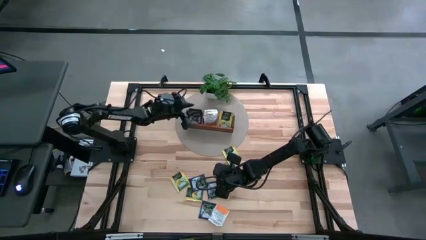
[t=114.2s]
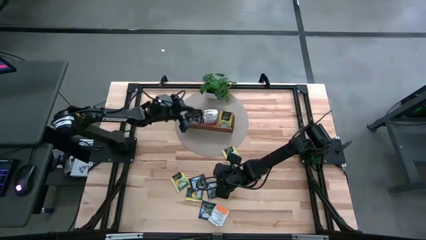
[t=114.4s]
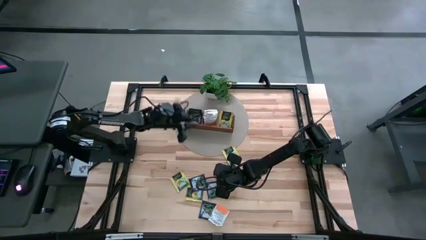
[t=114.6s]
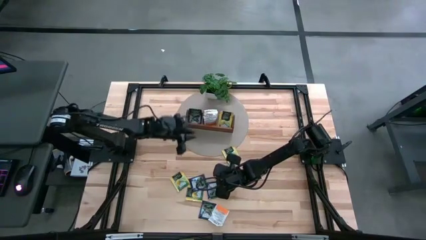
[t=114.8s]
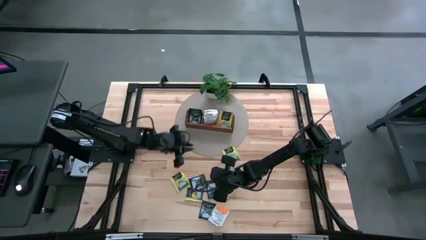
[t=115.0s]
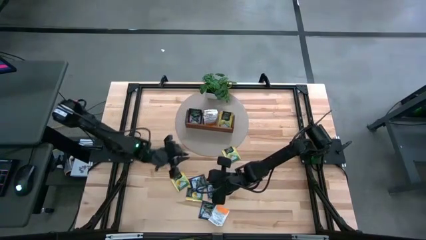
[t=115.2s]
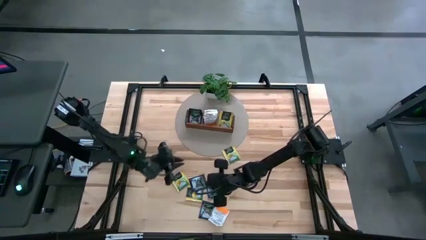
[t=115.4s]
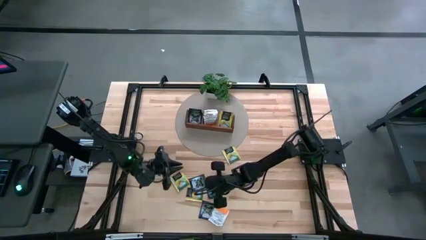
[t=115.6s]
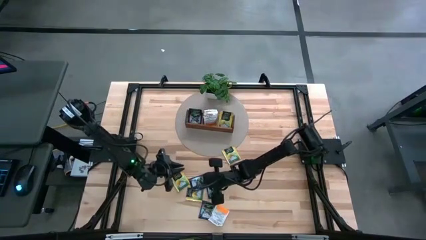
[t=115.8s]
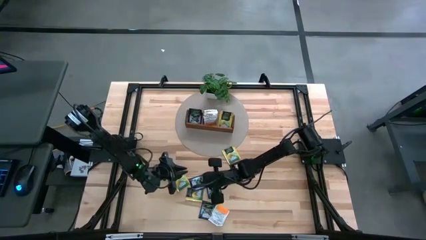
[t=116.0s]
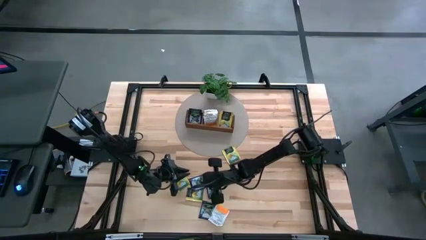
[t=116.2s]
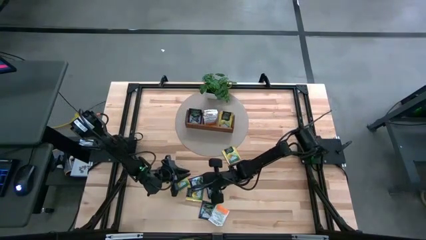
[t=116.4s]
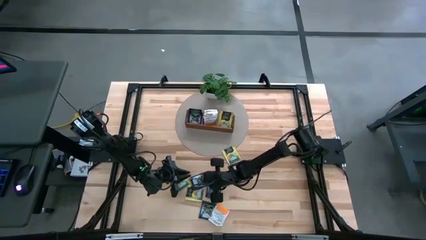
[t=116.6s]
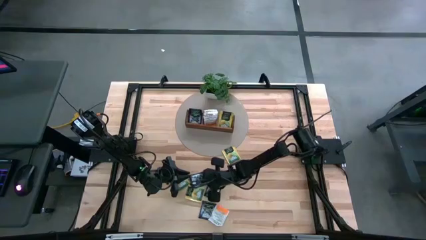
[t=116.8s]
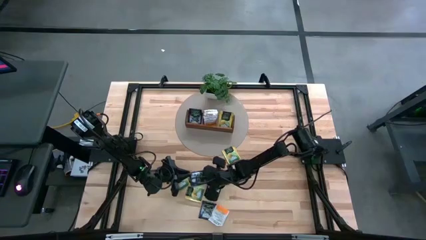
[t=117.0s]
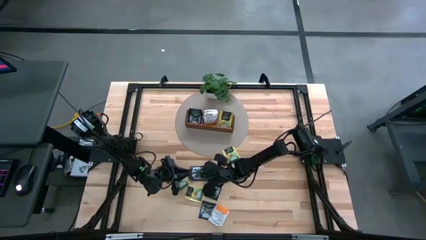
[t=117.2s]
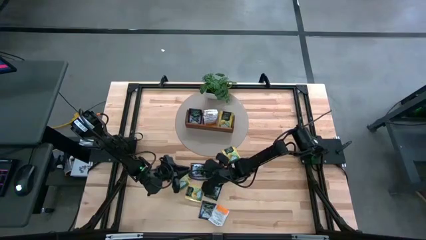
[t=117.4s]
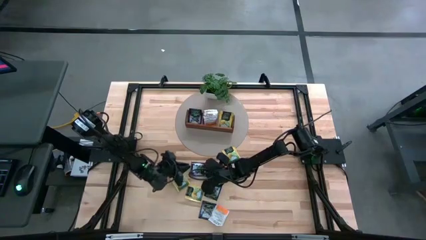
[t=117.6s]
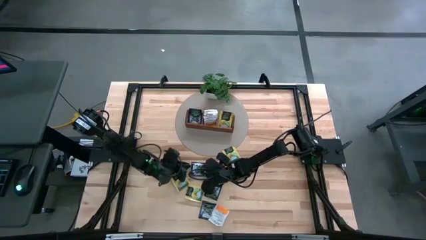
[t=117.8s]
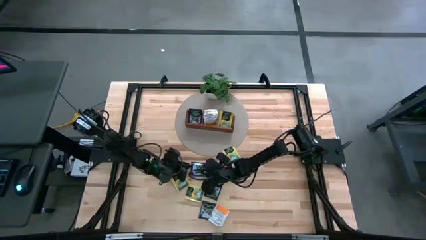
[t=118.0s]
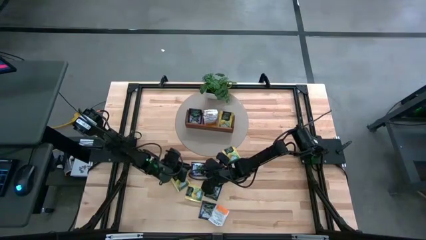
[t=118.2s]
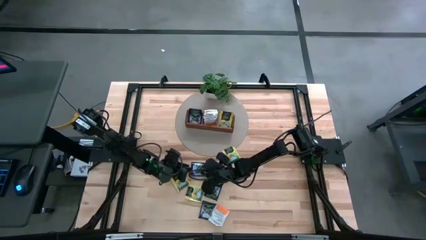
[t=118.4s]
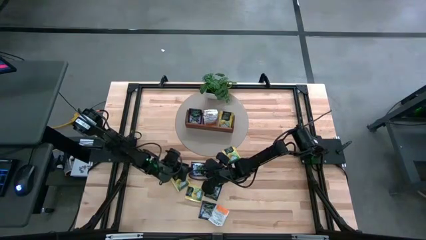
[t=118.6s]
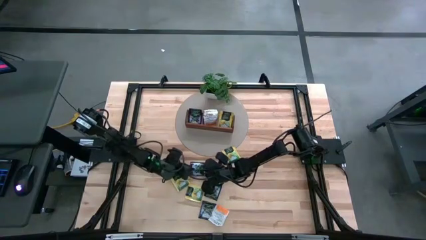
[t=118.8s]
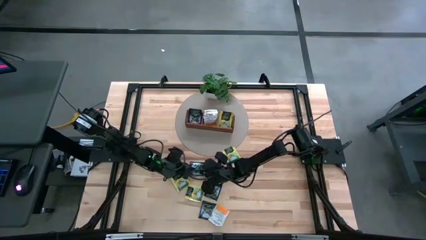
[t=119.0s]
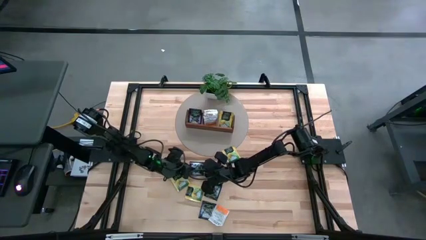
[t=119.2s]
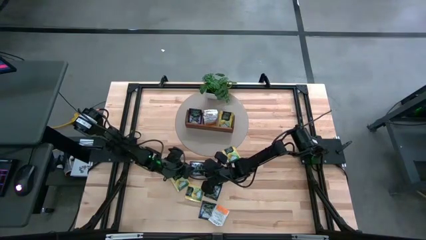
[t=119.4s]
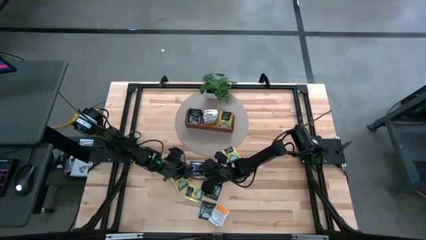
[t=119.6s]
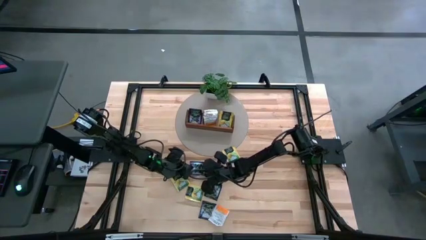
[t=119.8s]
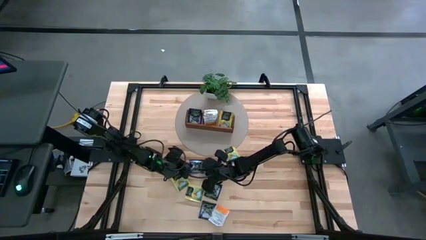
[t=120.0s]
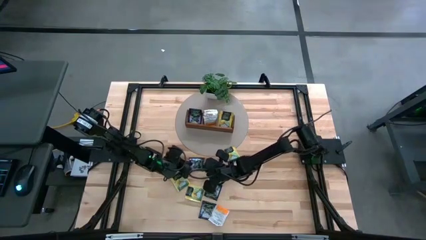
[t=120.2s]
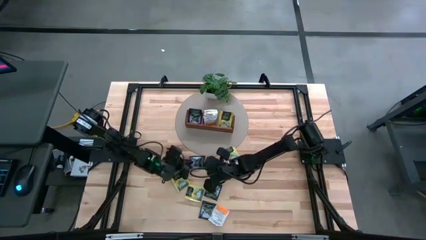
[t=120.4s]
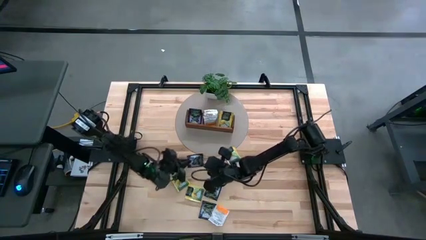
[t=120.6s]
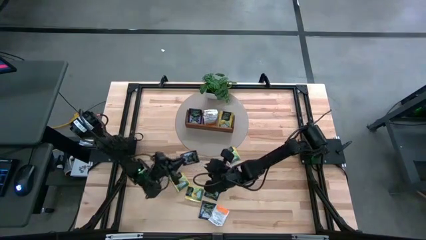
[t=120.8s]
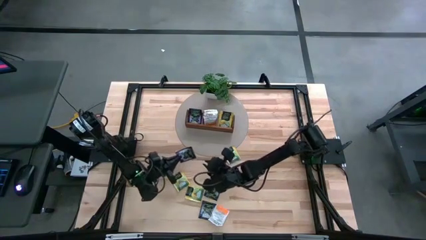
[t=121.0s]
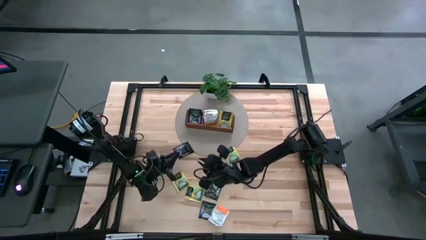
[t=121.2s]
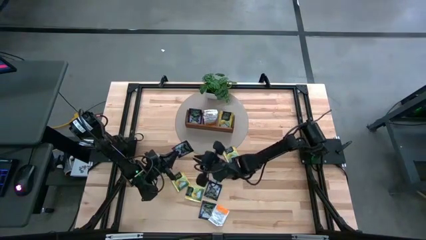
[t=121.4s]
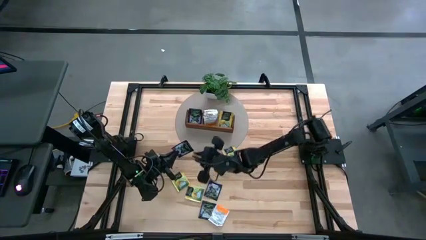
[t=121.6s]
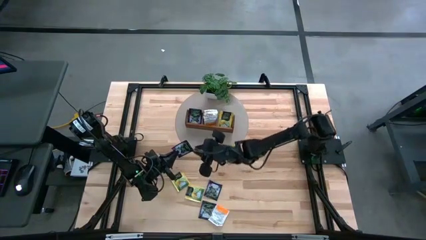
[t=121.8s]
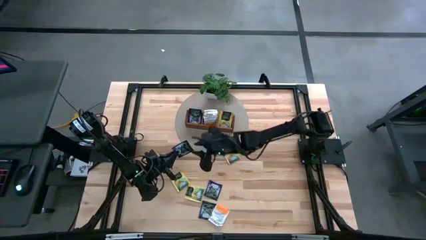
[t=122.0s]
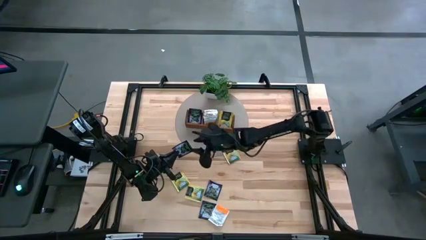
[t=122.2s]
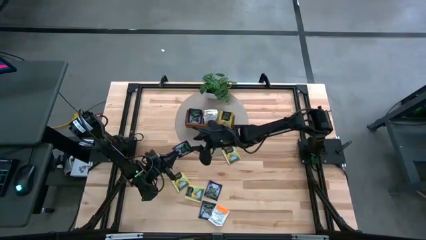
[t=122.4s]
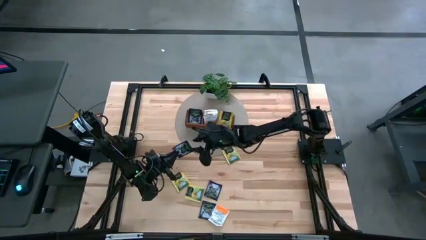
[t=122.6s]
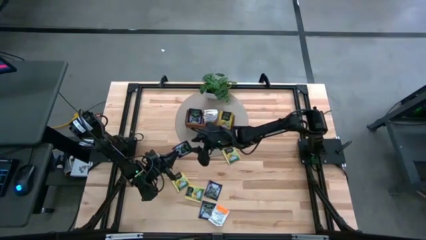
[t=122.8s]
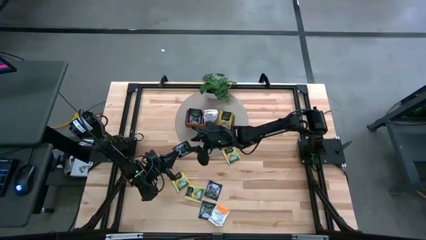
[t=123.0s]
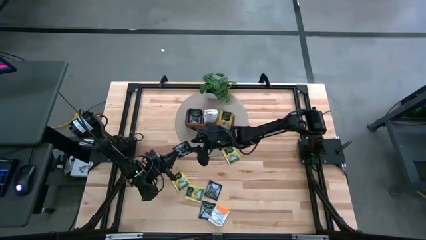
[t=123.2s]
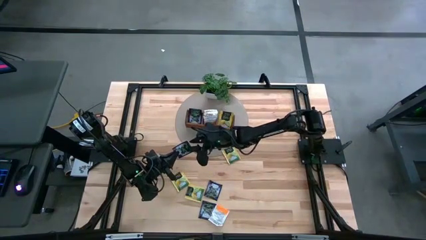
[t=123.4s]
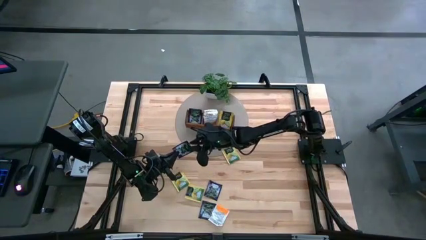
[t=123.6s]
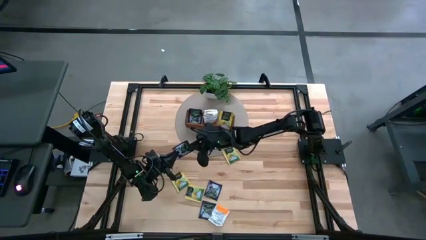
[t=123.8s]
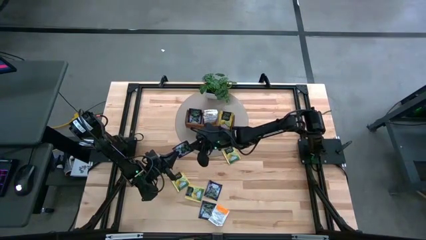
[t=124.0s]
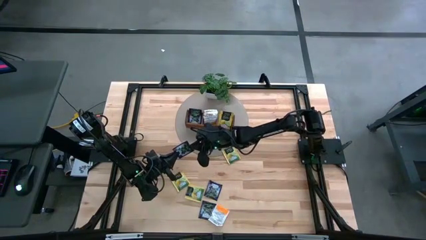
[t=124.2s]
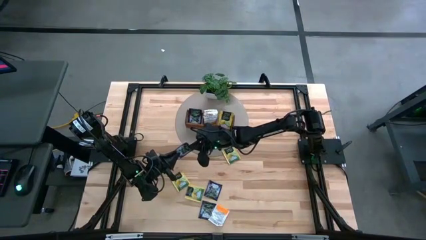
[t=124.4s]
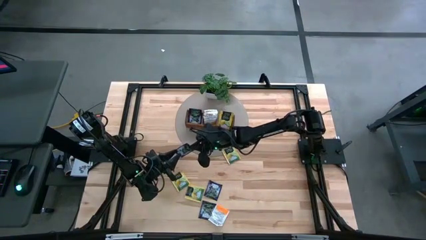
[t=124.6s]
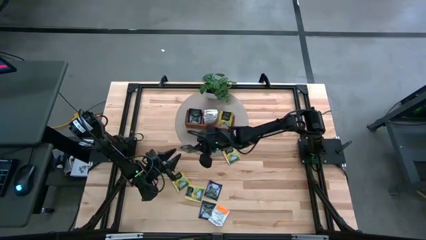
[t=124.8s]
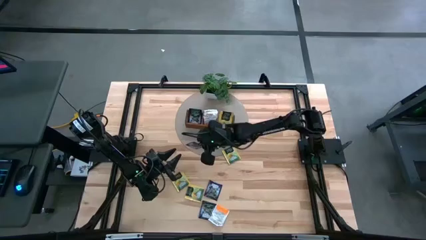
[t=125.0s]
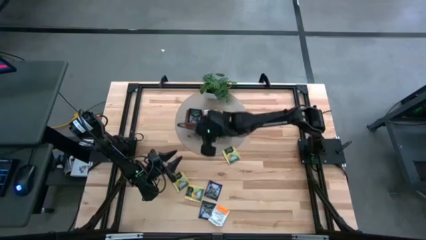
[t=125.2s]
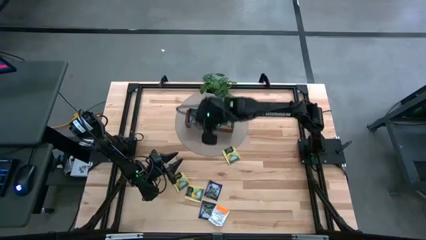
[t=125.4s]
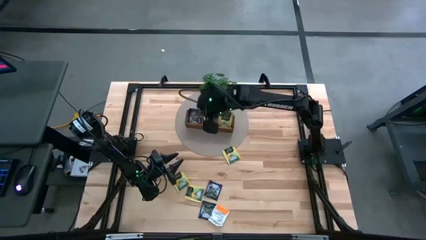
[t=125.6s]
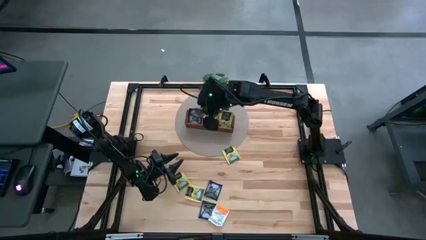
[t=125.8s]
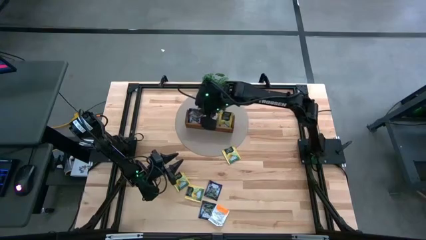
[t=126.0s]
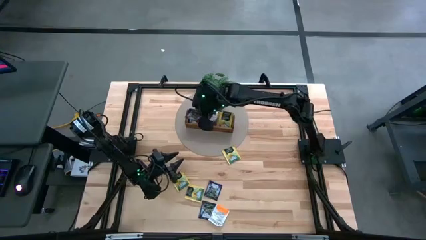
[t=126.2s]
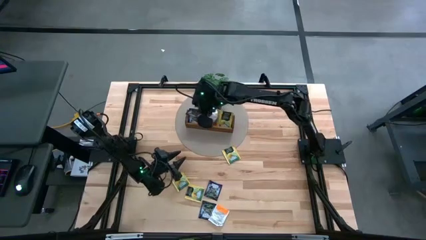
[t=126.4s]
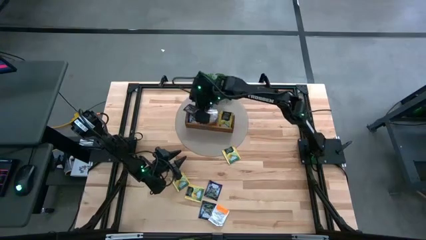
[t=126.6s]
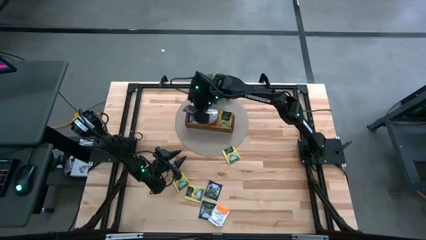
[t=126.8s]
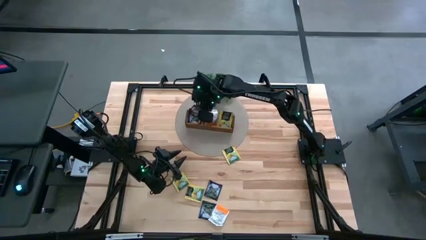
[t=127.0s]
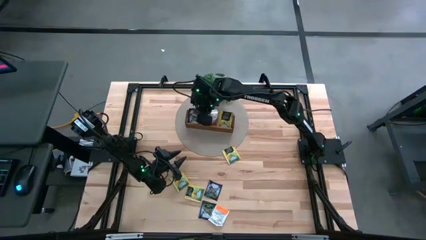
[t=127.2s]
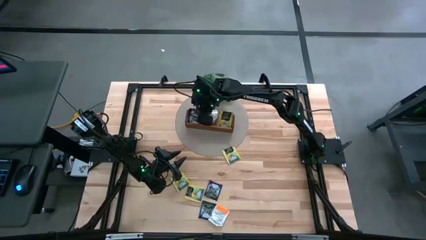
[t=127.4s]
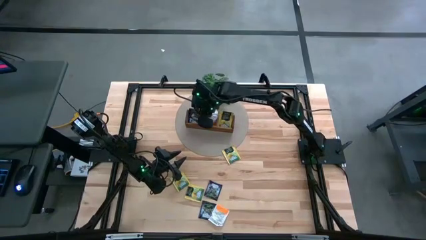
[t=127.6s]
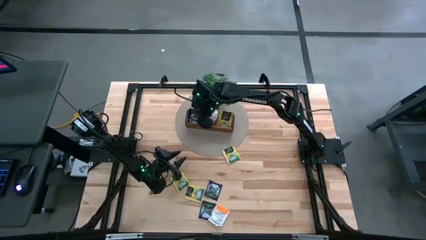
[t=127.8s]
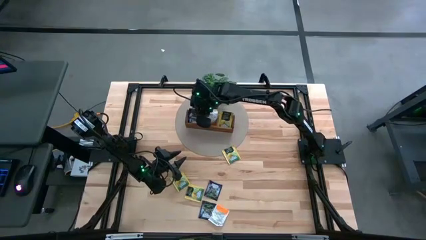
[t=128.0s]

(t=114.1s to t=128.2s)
Task: Pick & Place Tea
Put the top purple tea bag into the left section of the wooden organizer

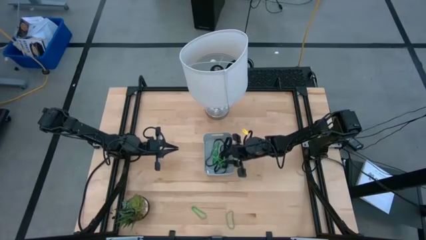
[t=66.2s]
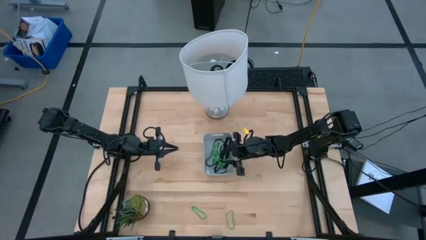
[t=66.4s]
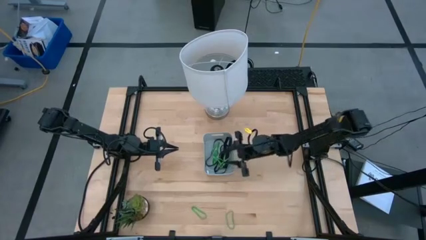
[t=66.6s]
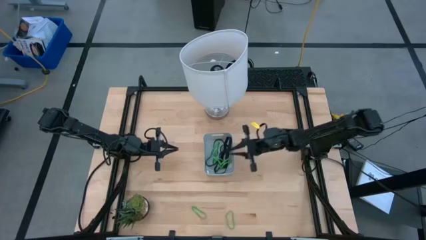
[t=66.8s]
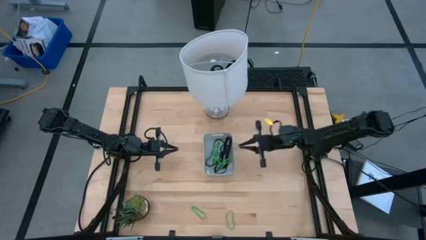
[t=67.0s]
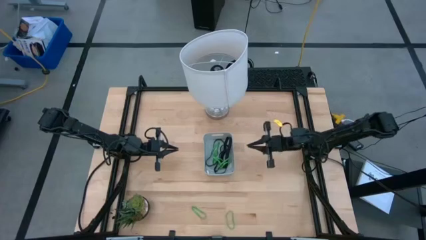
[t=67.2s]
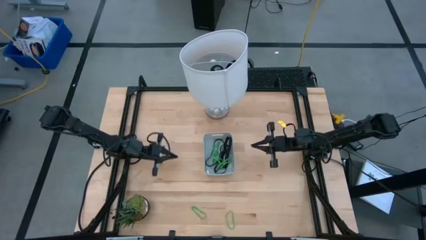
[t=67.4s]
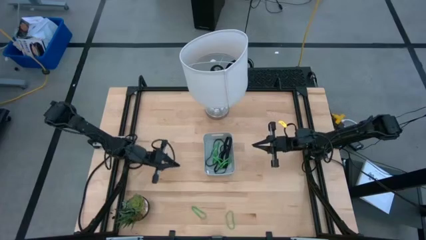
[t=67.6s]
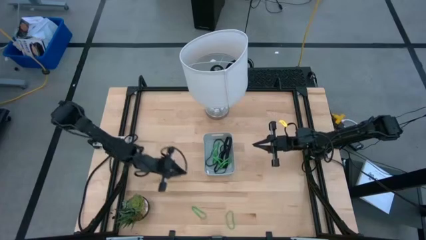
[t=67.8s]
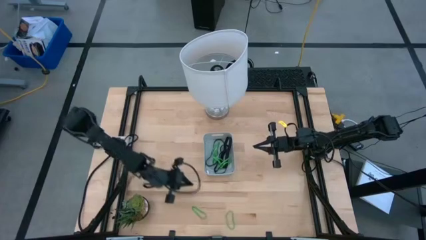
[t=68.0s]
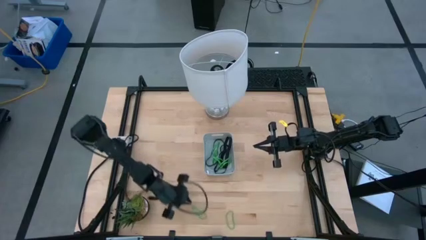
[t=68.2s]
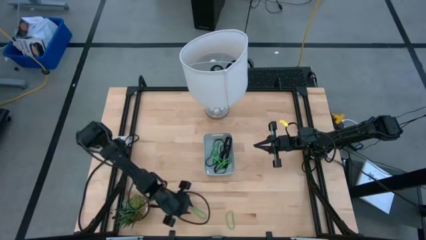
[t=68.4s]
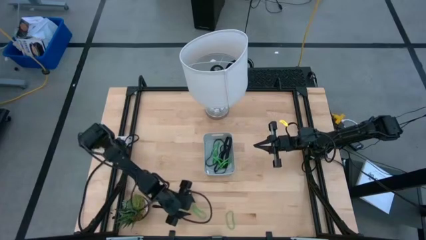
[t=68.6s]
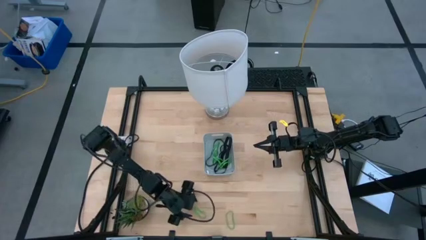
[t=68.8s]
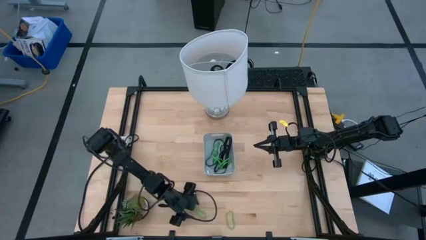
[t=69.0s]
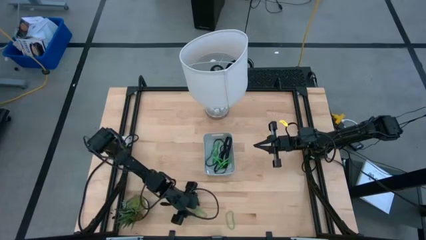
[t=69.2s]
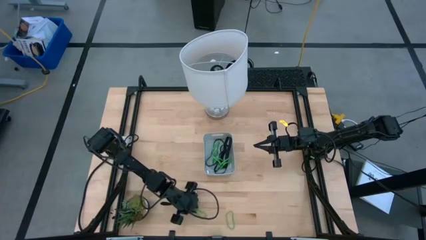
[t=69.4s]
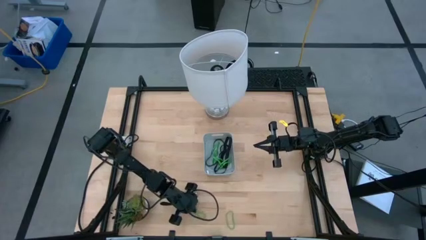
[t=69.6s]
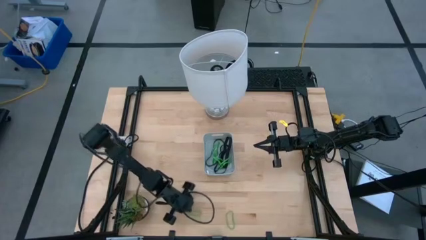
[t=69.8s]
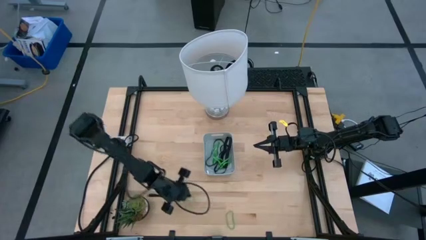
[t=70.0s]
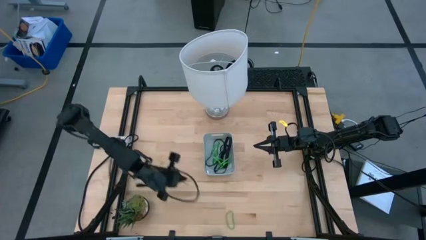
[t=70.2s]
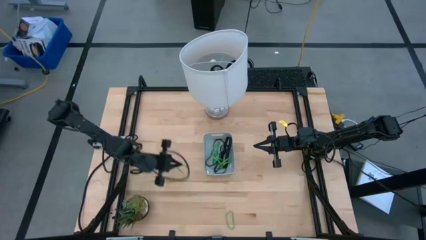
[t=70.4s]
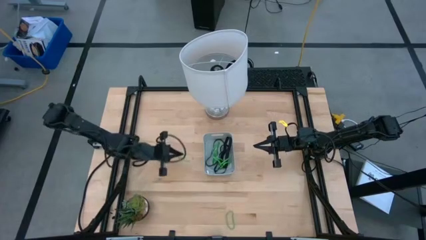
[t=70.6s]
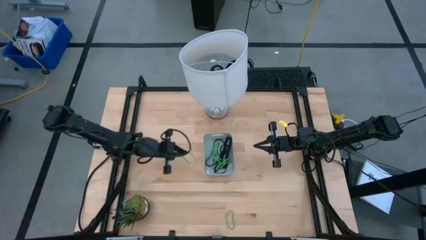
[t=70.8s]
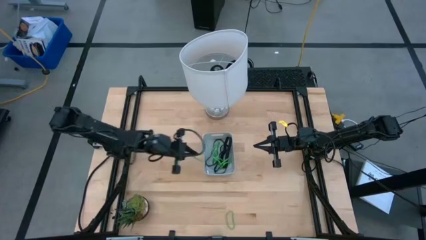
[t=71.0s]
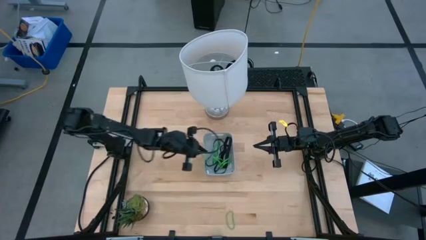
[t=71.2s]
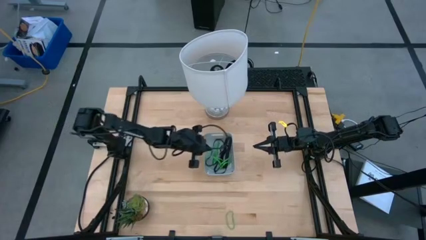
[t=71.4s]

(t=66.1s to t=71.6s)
Task: Pick and place rubber bands into bin
Put the green rubber band into the gray bin
